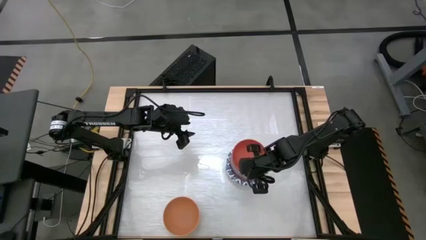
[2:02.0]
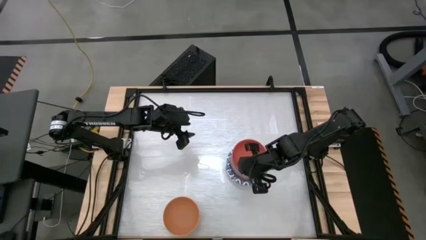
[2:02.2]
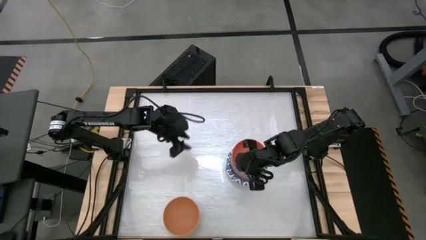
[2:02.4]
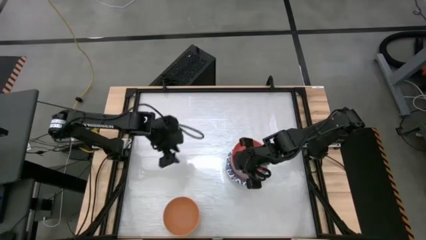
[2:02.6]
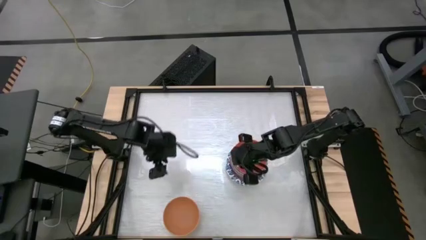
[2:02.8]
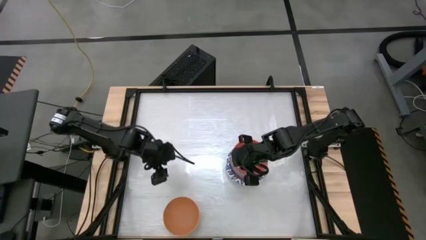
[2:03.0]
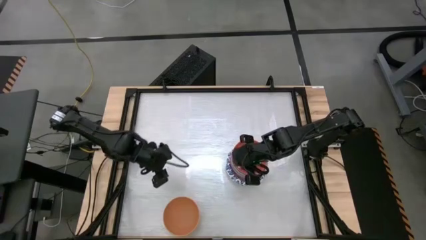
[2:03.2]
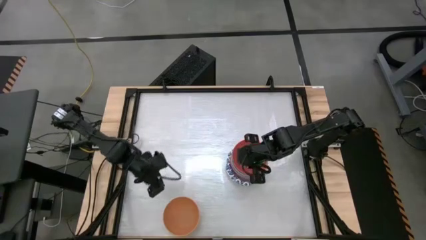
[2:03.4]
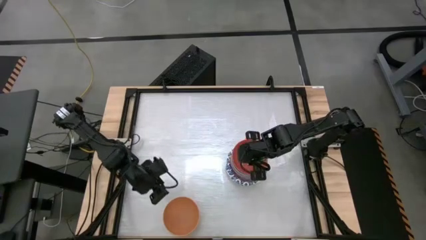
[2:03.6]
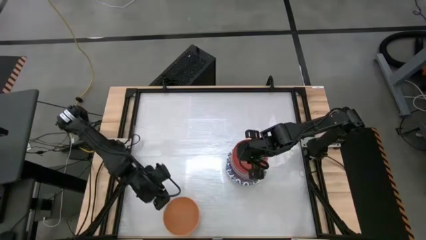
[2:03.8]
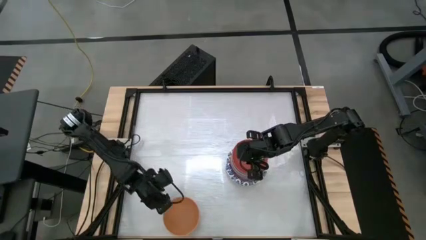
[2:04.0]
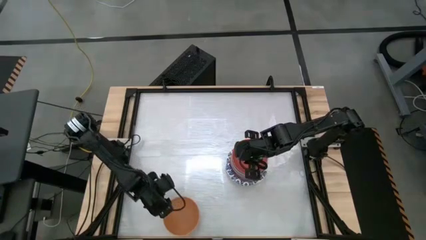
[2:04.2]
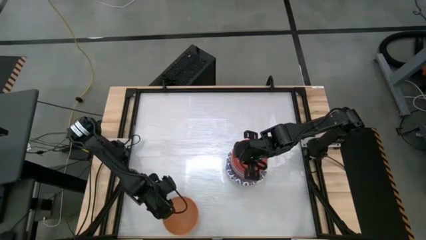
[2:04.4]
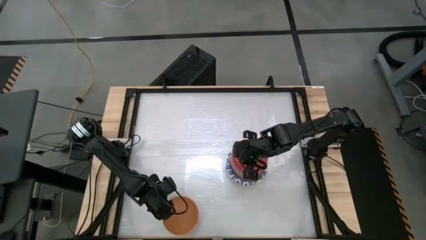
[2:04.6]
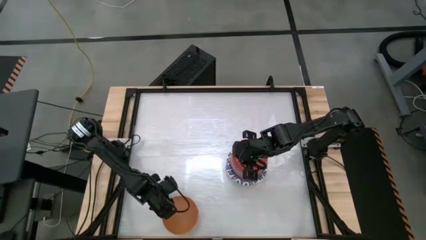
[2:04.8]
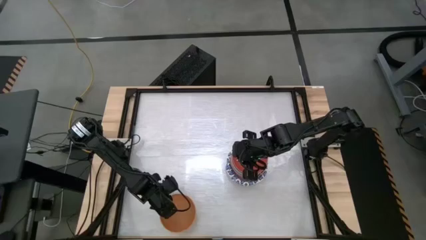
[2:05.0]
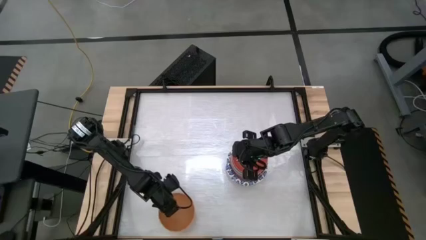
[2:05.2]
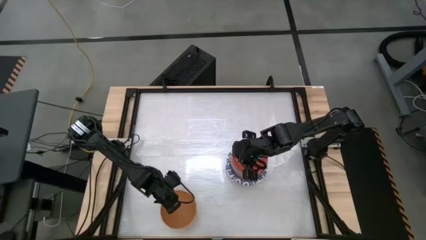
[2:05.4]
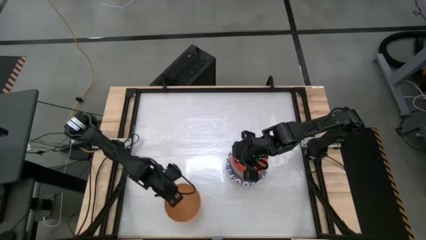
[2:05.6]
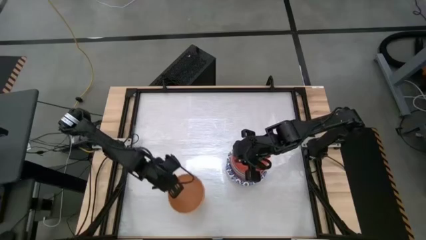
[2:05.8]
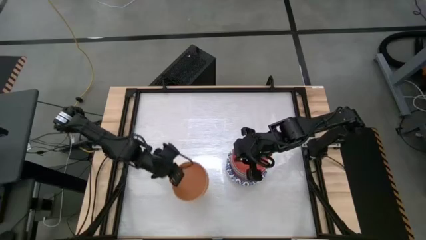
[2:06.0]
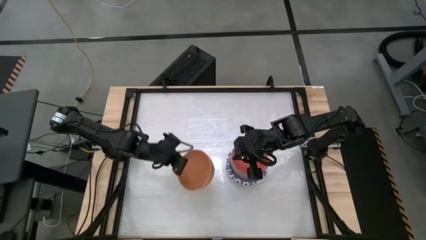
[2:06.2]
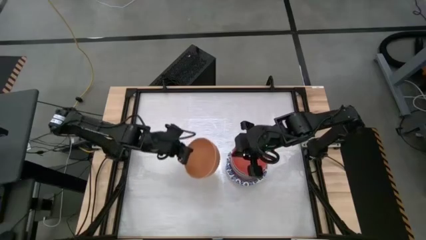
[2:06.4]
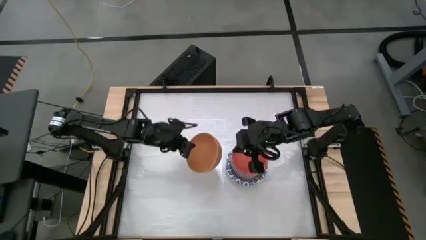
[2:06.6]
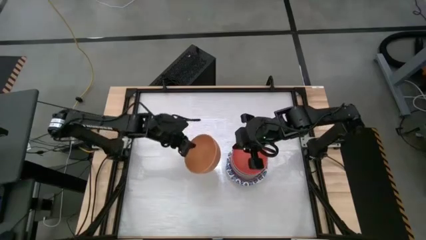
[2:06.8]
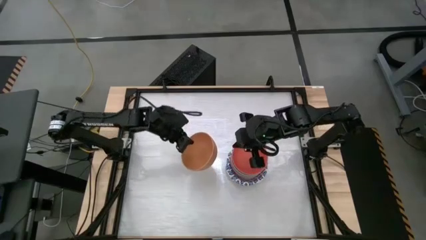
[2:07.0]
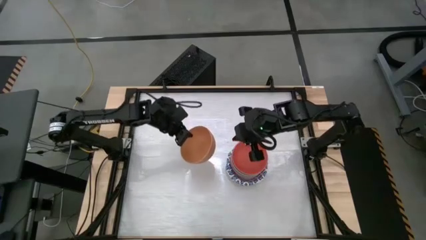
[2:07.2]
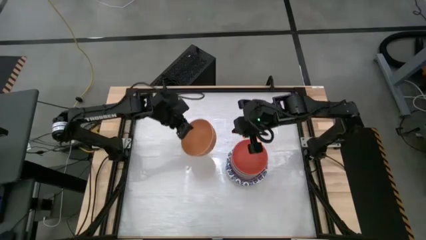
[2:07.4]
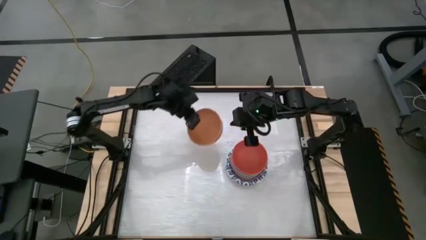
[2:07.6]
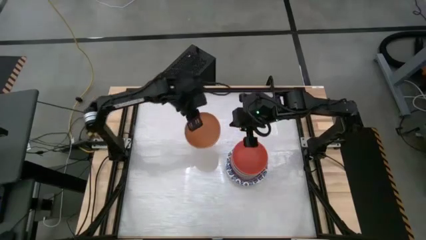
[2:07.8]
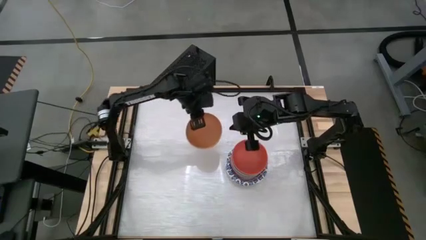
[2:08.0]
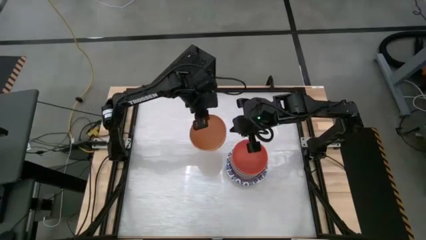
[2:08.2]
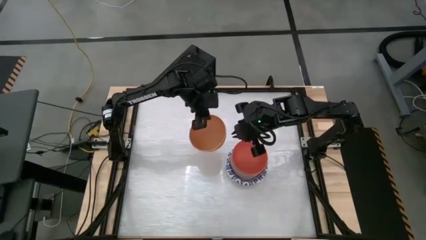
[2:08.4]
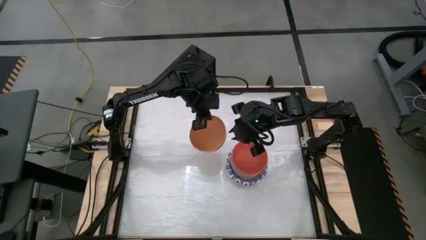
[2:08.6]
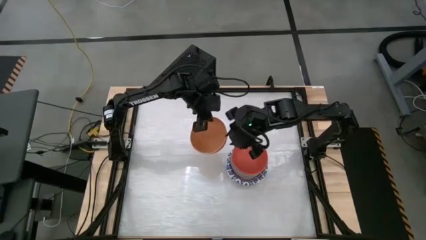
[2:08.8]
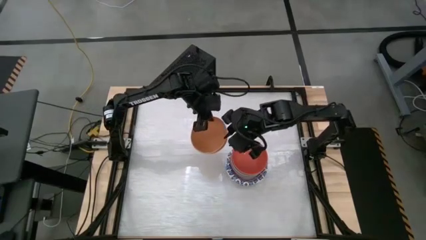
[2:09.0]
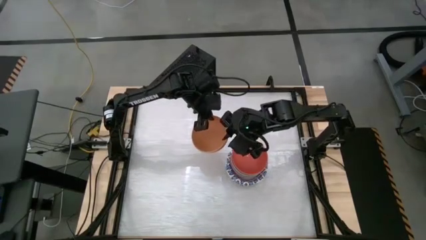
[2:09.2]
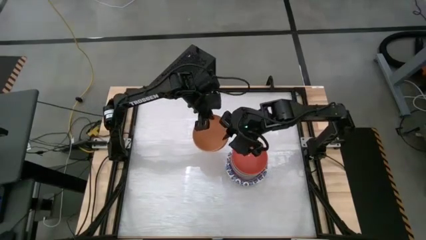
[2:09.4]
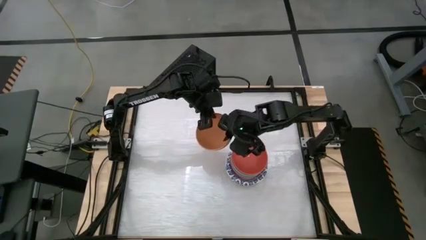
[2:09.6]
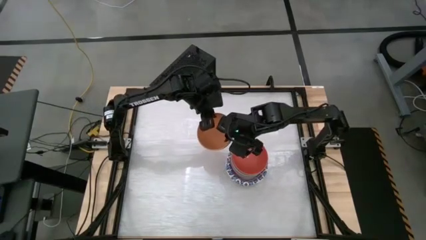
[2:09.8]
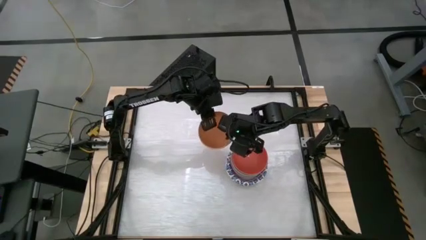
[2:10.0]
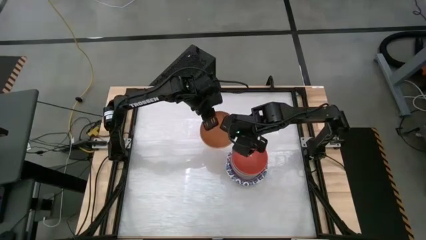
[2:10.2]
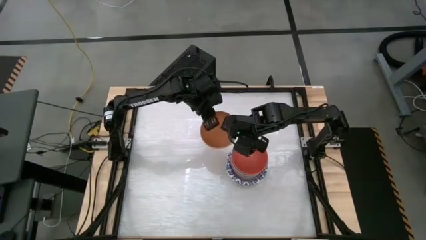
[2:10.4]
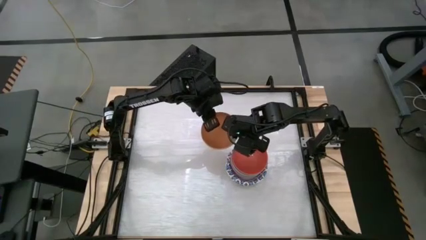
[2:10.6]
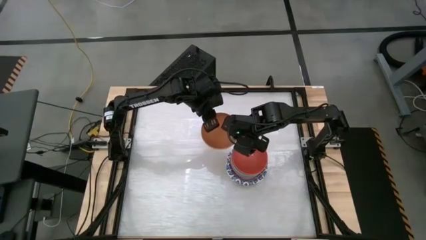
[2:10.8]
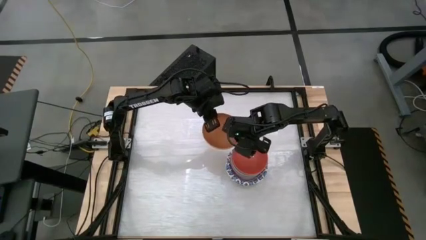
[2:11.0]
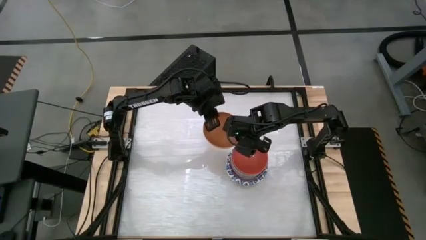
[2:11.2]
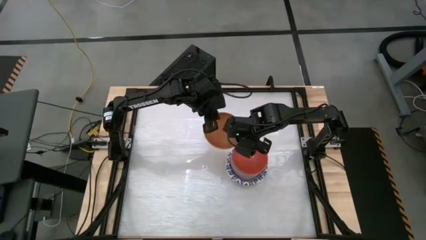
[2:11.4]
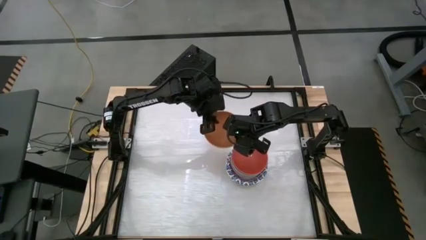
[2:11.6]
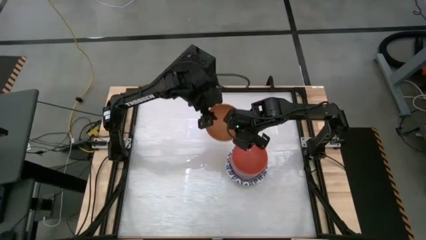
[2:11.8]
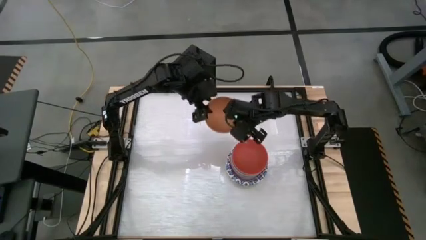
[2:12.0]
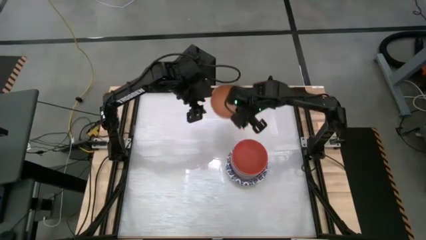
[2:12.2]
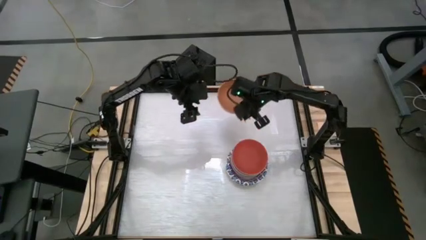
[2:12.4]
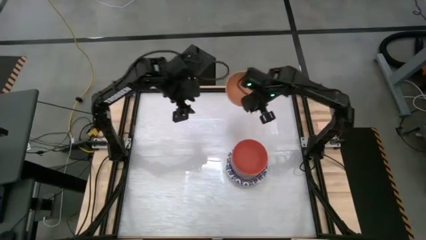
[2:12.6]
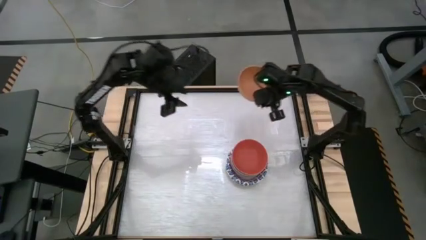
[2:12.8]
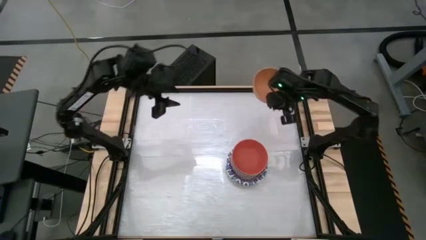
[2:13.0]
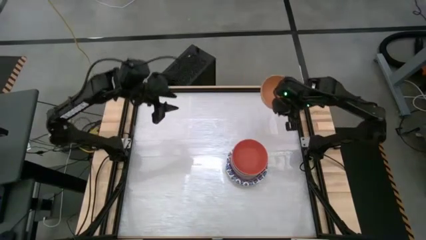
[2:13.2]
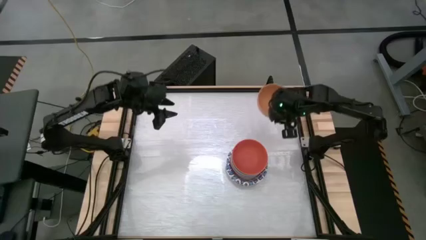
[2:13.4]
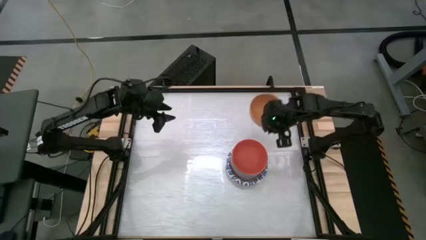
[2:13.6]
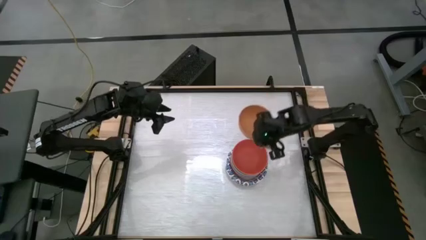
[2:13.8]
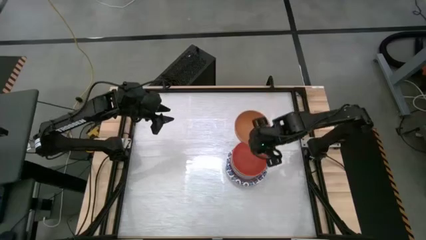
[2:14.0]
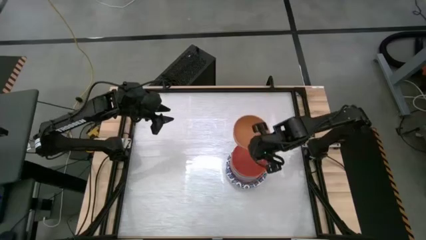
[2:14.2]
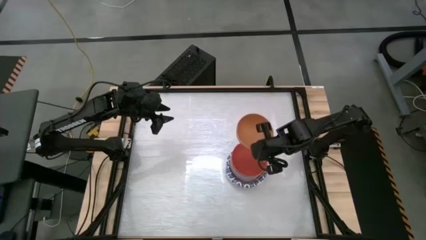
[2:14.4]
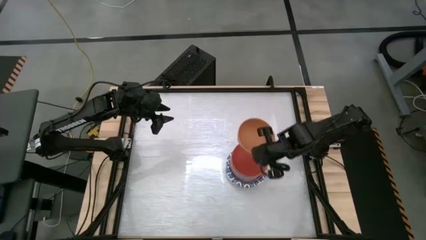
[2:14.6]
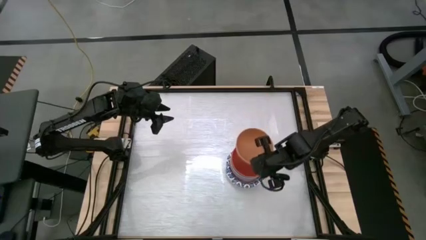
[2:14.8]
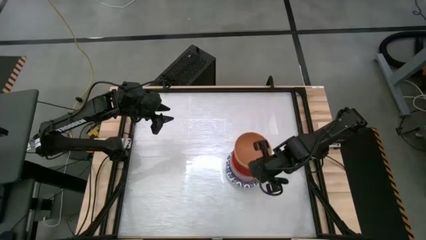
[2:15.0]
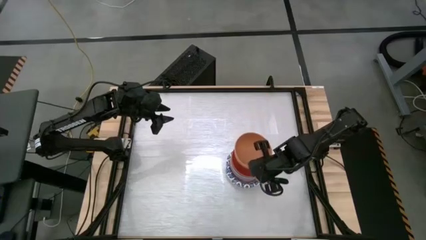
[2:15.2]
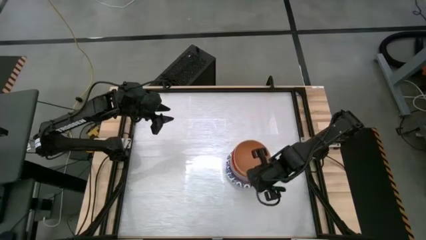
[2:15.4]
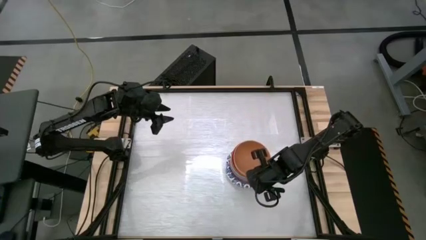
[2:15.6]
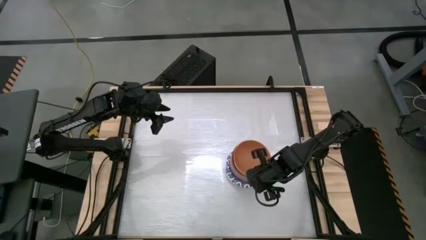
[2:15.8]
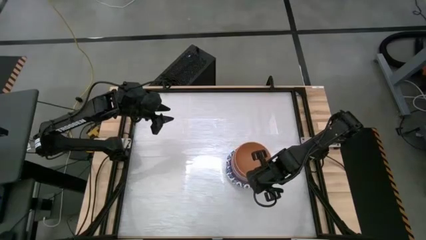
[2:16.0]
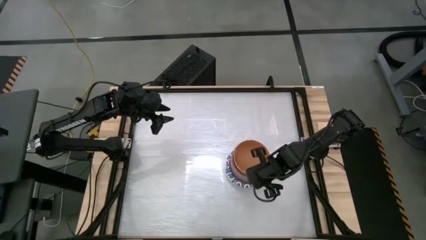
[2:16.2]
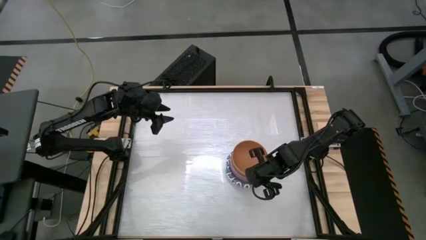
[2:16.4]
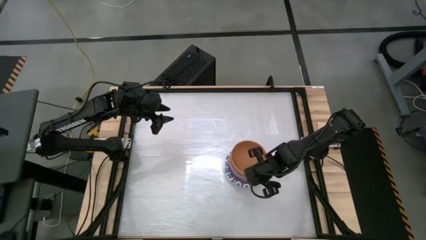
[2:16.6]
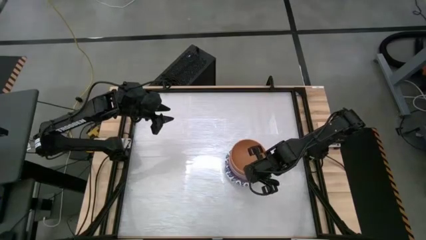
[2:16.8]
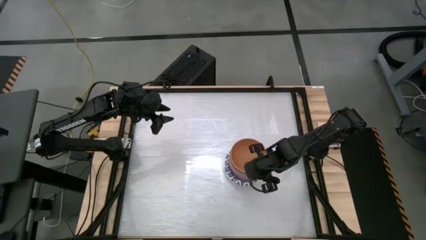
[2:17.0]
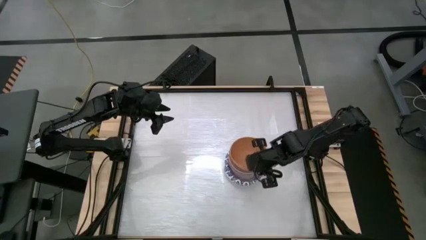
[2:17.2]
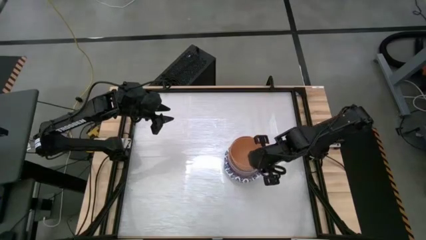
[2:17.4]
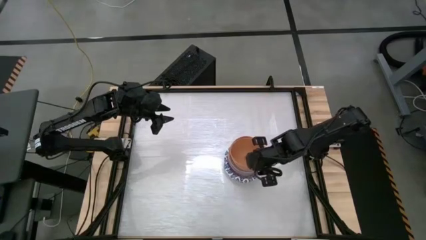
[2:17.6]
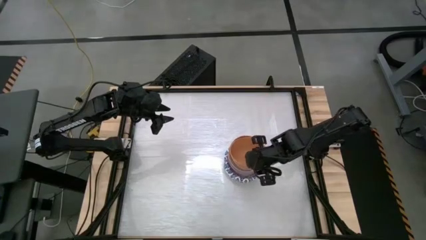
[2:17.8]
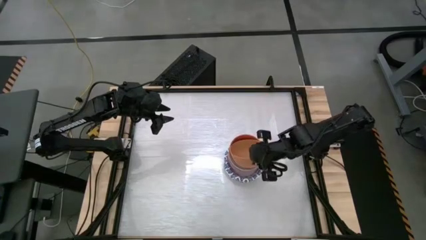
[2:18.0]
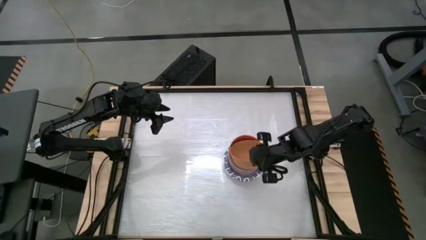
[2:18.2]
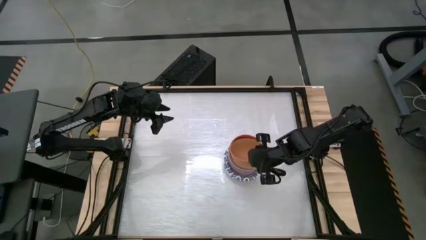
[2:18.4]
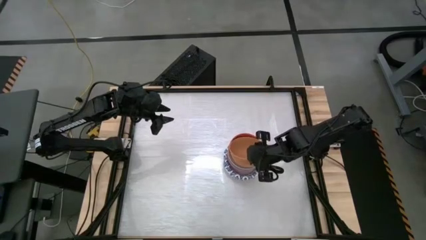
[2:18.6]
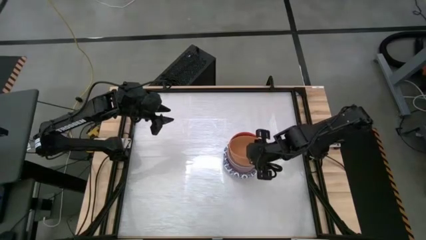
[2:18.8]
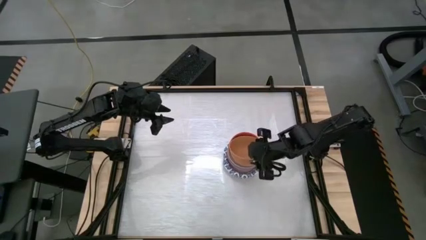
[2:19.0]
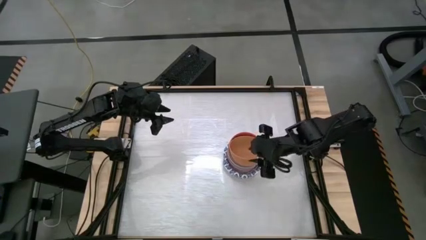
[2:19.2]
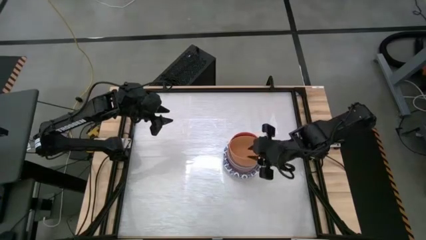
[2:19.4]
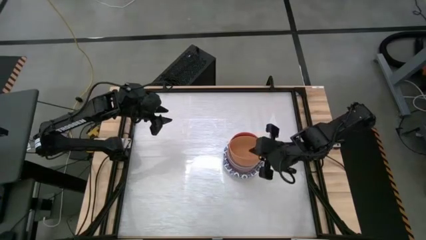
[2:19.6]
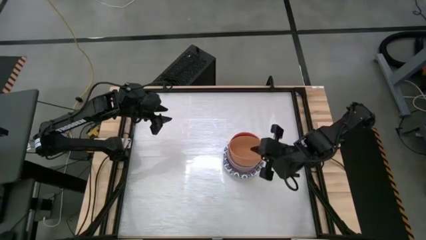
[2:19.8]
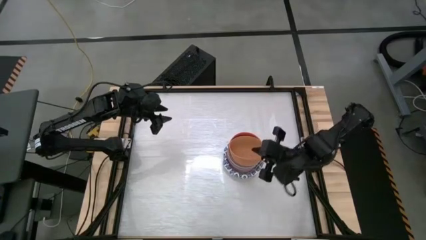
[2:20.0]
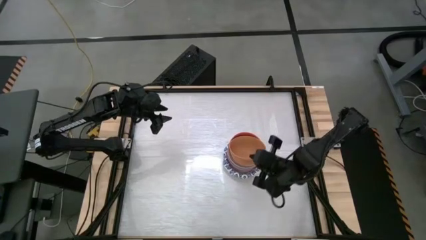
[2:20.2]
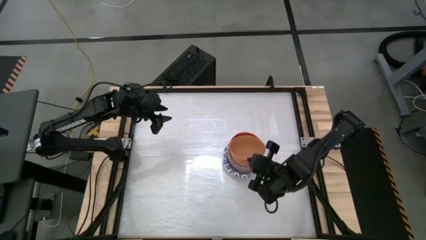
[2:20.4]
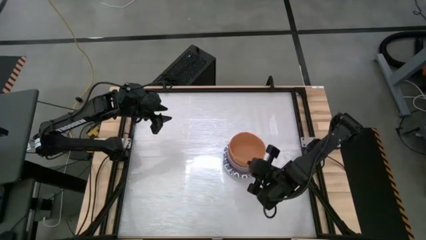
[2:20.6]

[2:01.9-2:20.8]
Task: Nest bowls inside each other by size order
Stack the light orange bowl into the orange bowl
